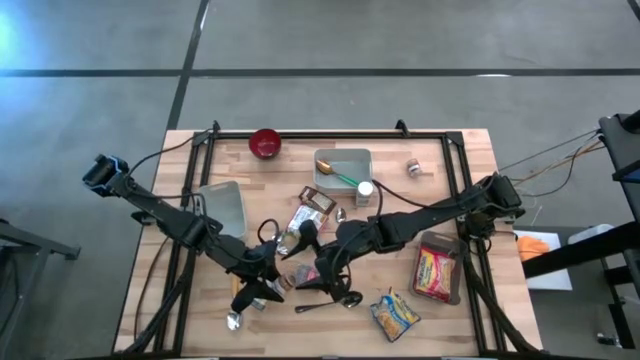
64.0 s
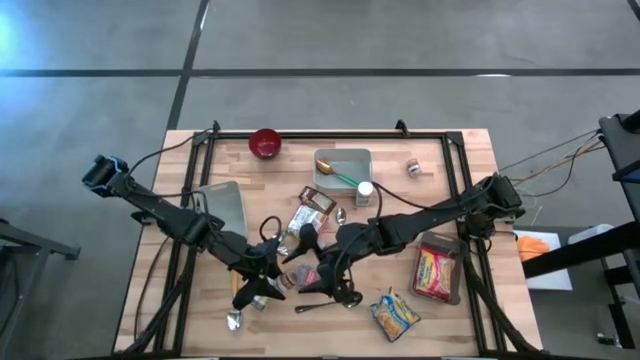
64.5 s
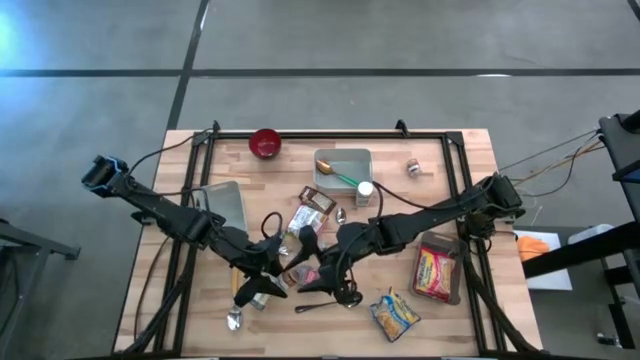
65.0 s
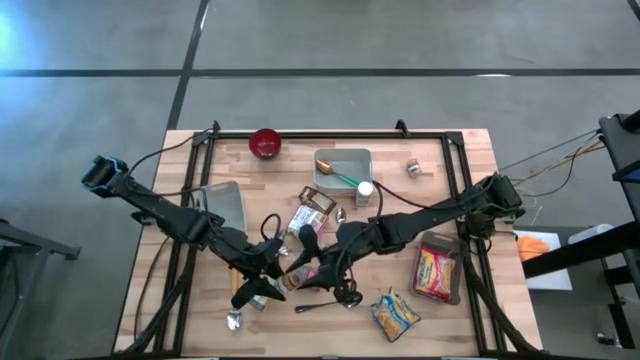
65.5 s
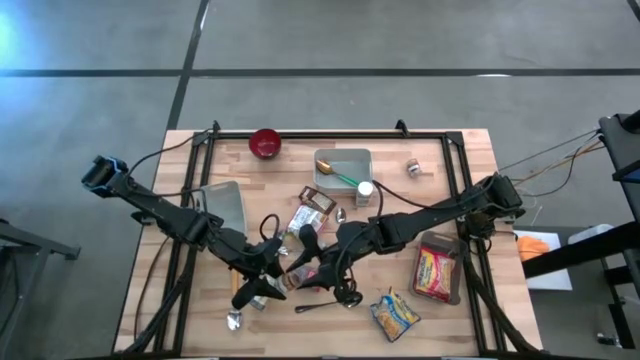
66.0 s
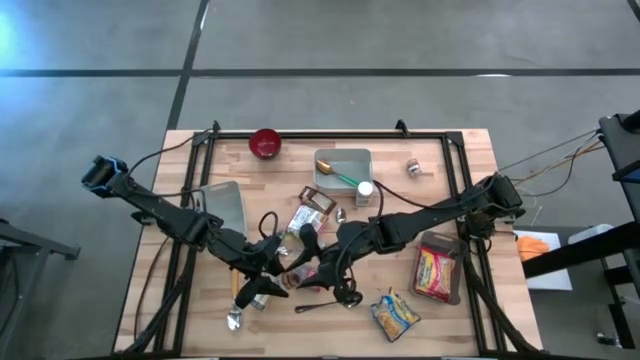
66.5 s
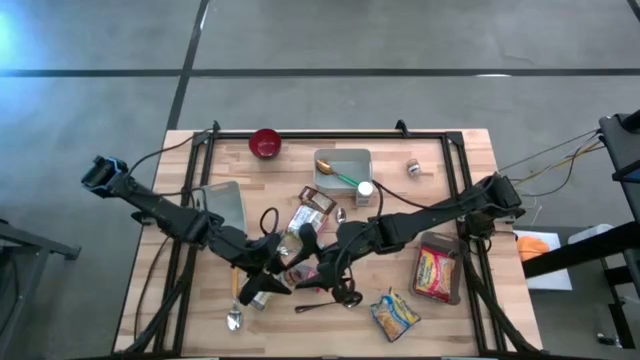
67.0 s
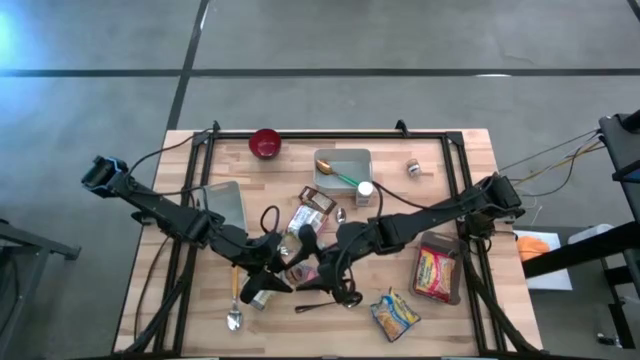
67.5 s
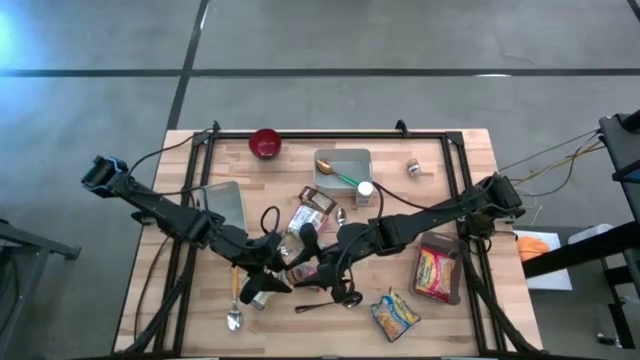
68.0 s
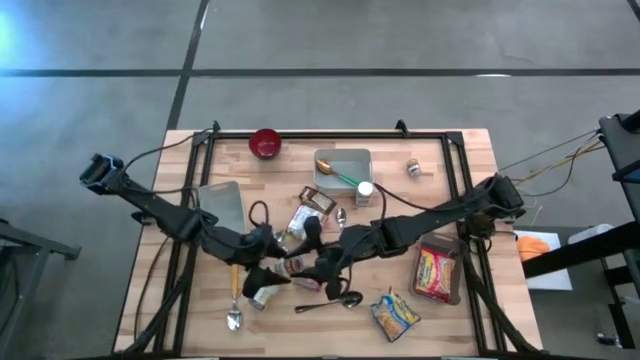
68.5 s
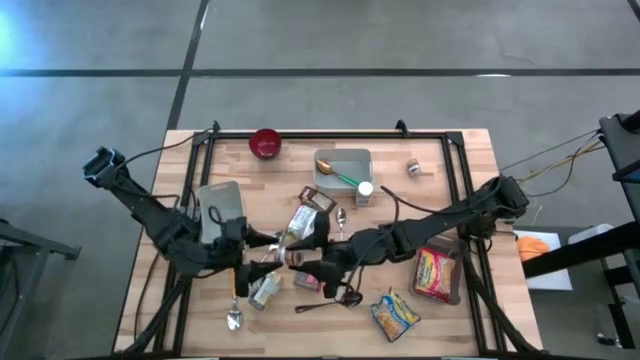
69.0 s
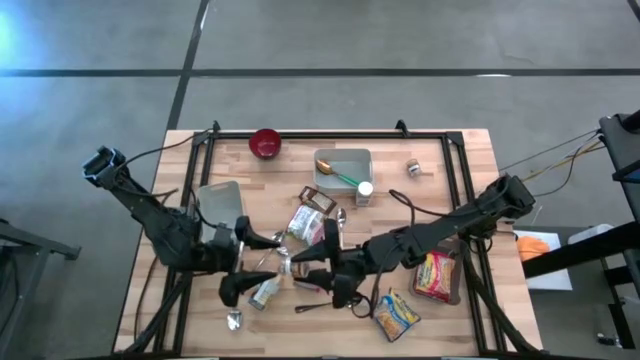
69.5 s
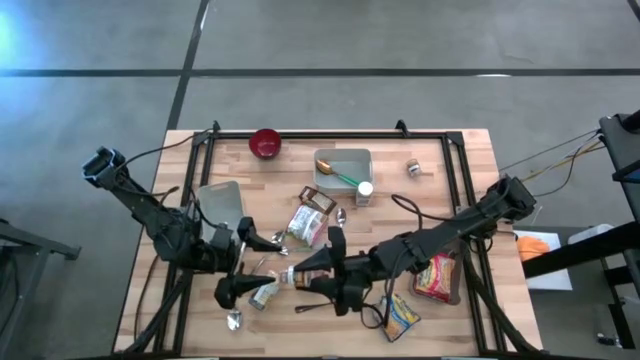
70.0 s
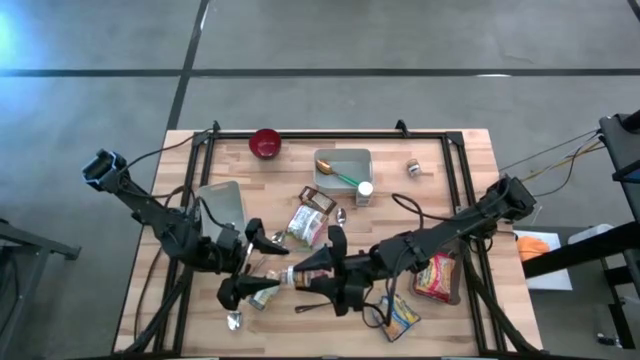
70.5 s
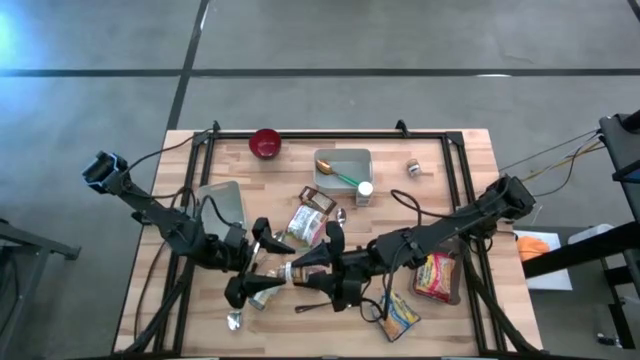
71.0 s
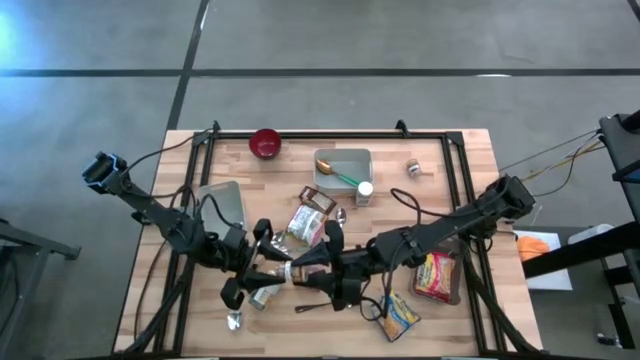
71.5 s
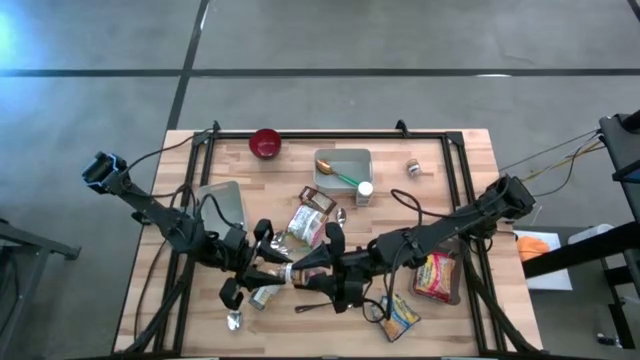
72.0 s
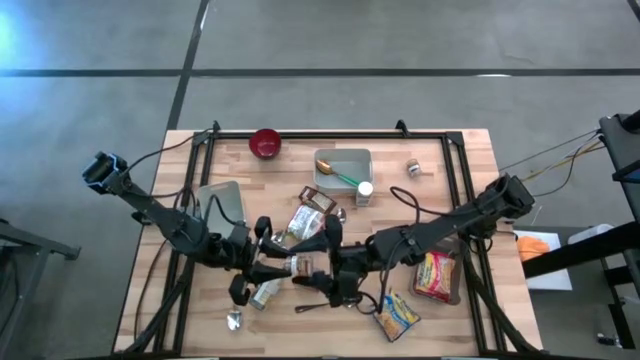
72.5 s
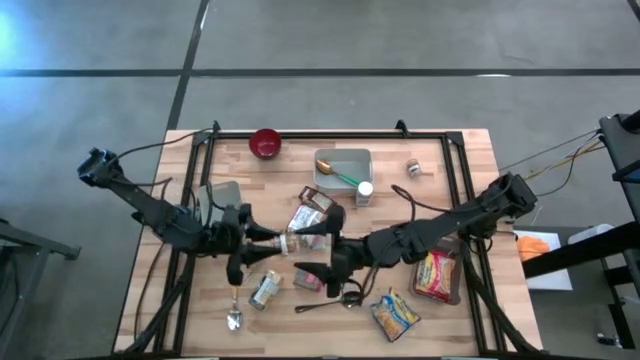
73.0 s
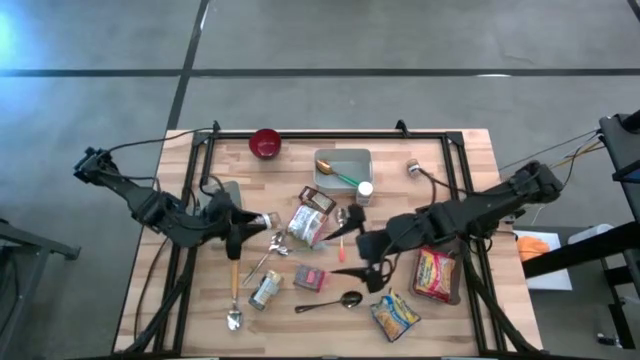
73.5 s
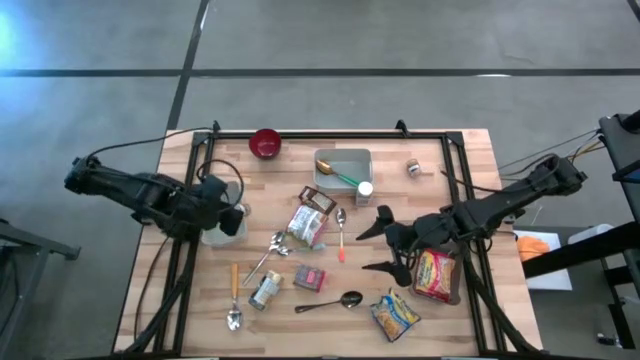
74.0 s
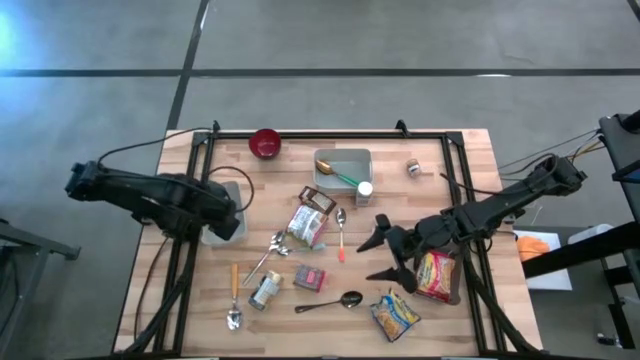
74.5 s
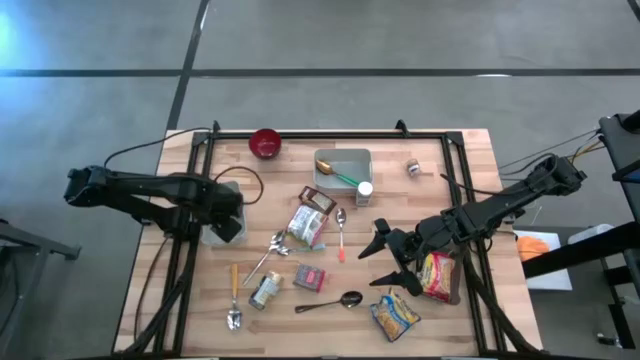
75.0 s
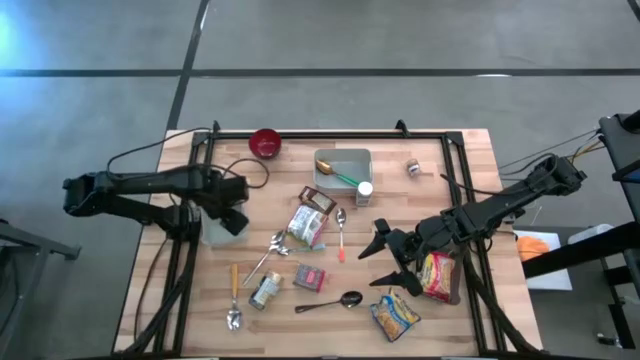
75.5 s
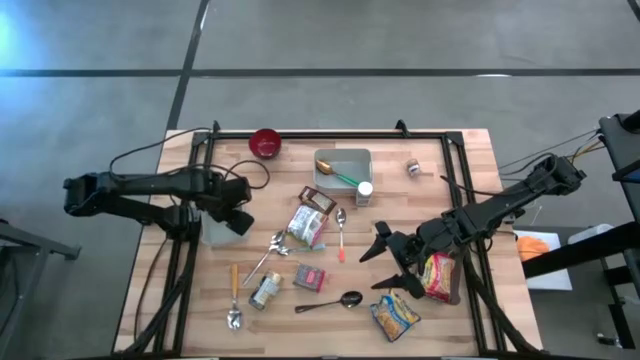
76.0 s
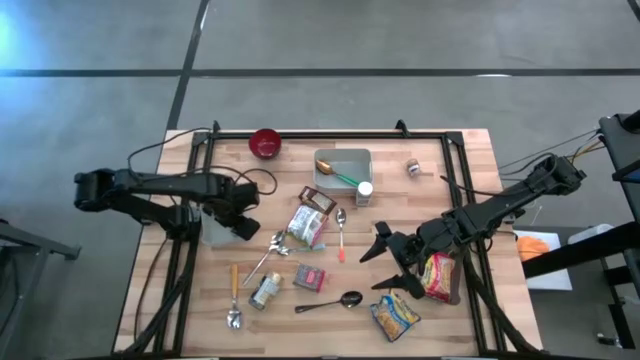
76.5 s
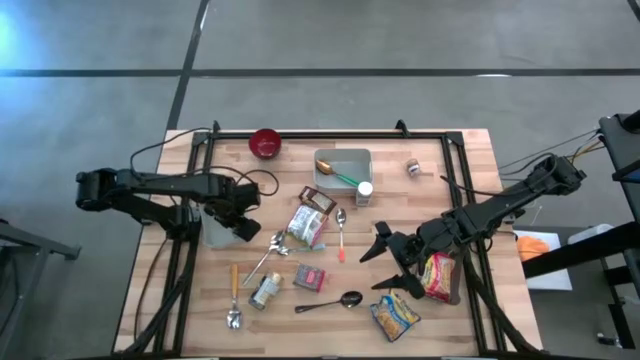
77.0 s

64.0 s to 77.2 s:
Put the left brown seasoning bottle into the left gray bin

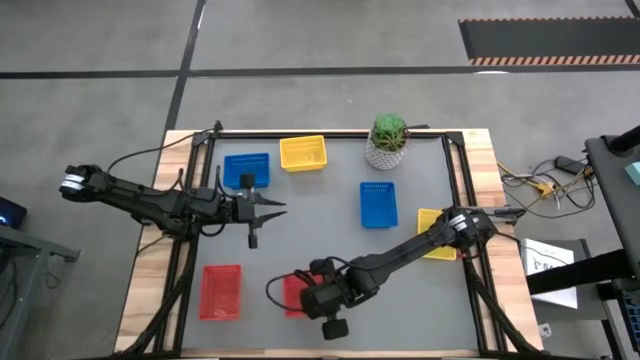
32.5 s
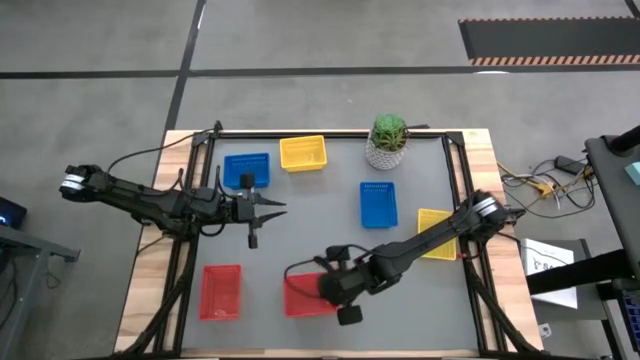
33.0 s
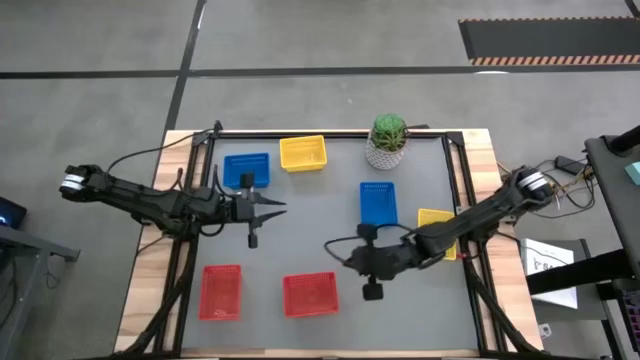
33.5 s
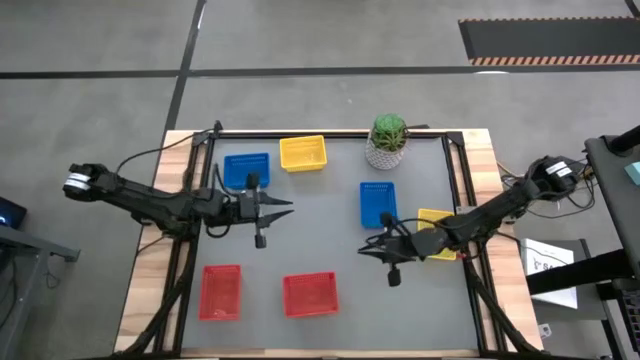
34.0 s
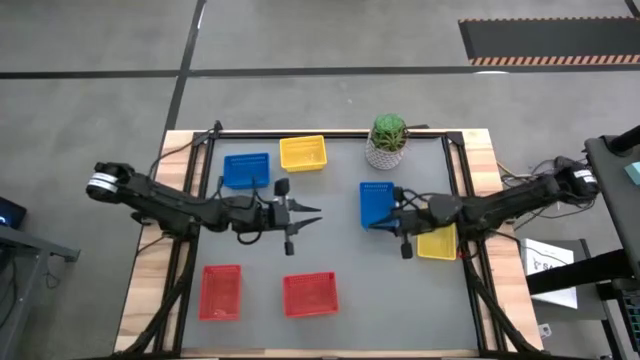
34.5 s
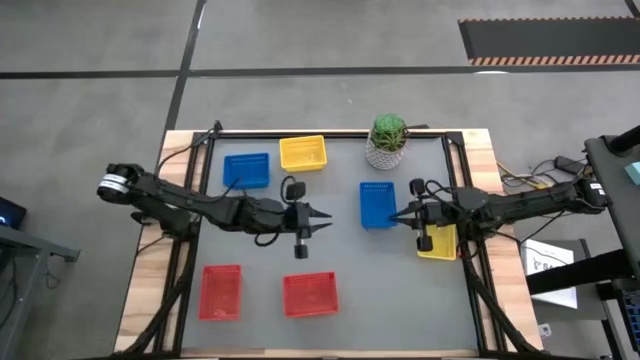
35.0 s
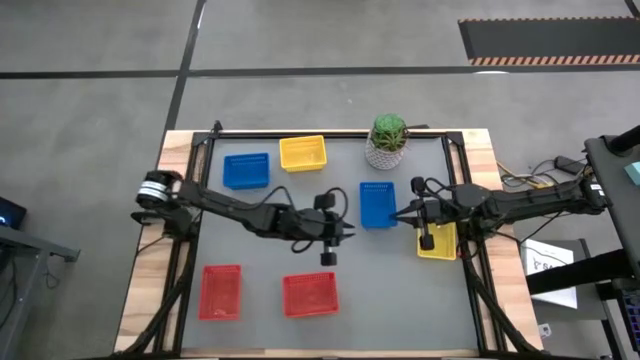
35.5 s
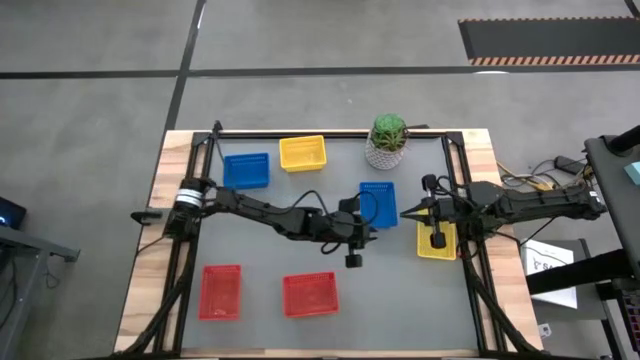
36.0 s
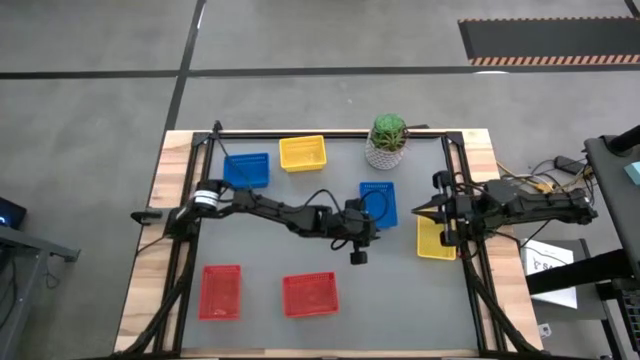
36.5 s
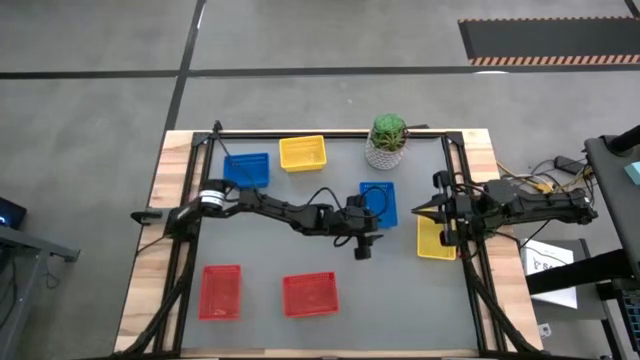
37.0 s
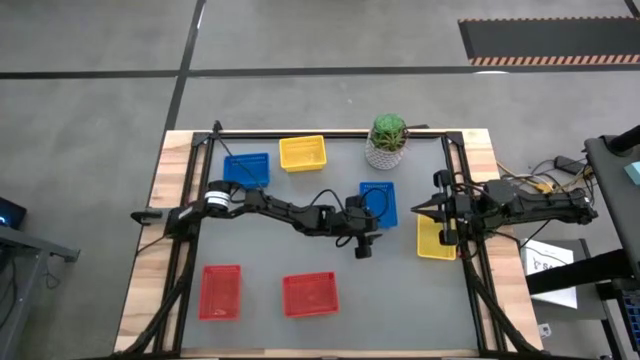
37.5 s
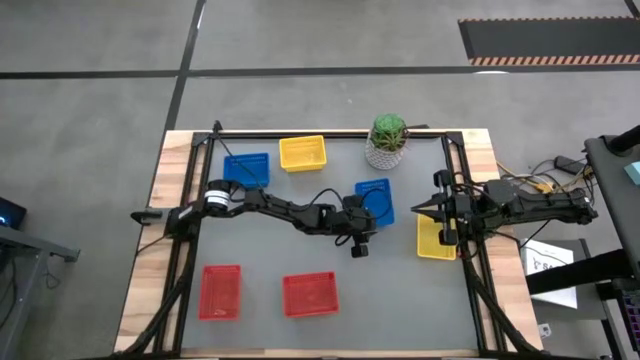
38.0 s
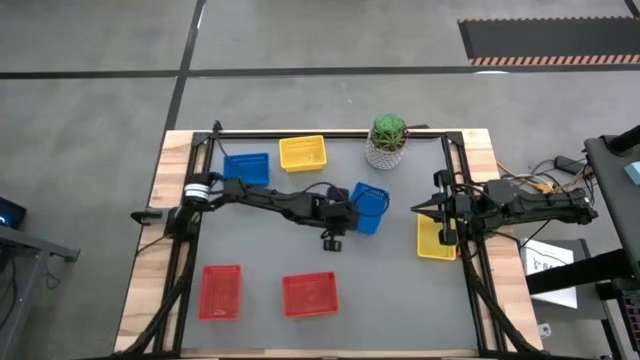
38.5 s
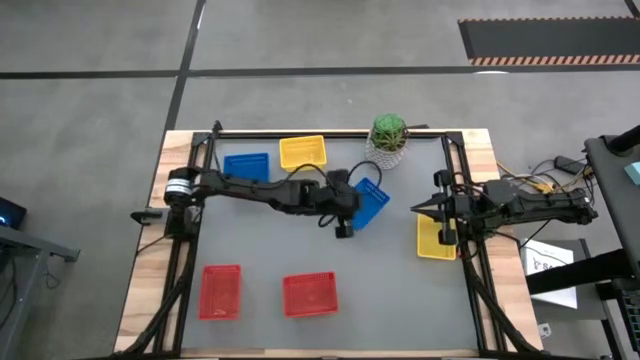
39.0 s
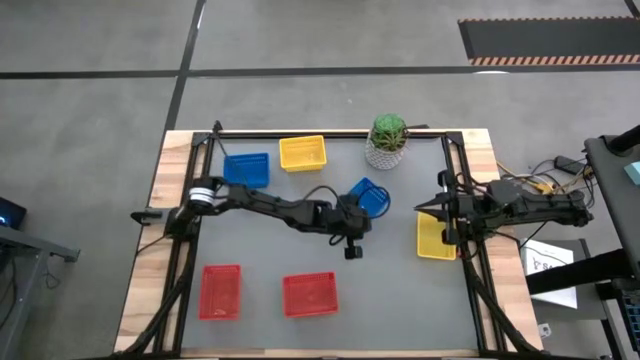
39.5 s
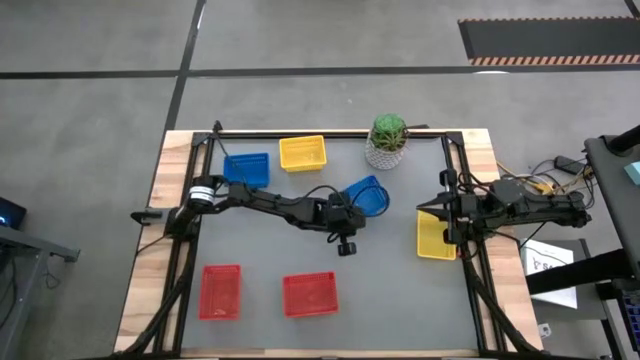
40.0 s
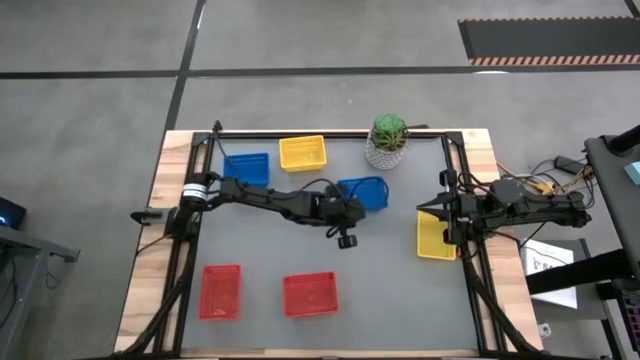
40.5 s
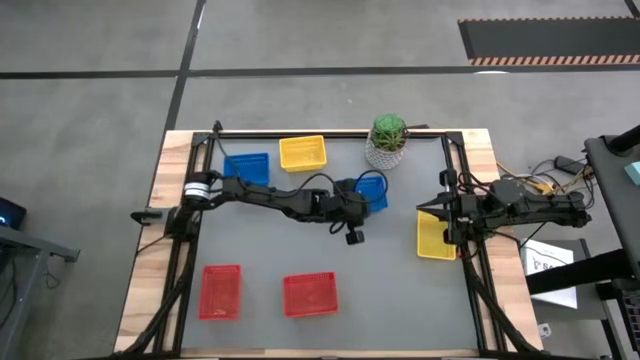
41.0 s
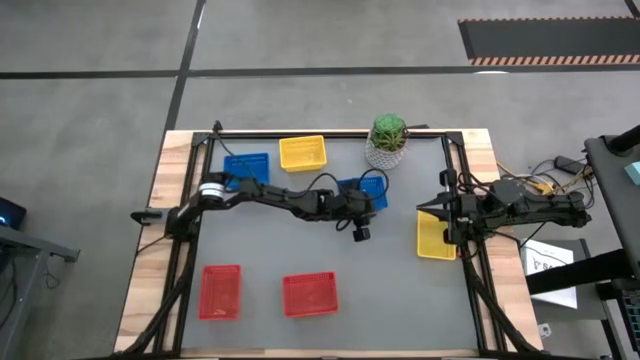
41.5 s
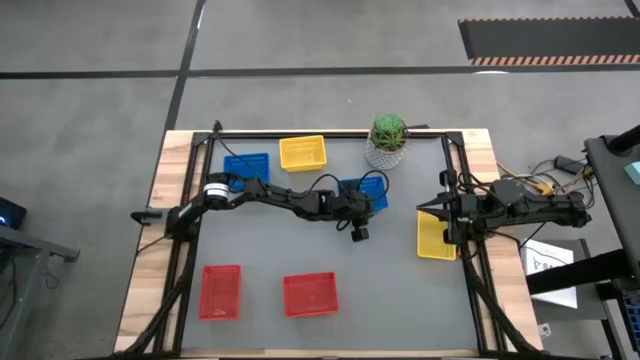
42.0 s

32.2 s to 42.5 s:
Stack the blue basket on top of the blue basket
